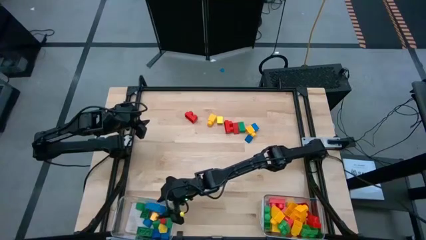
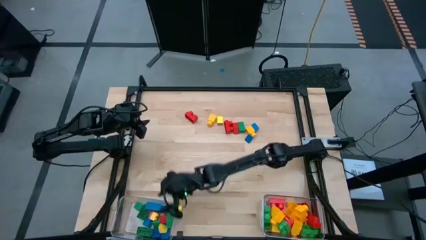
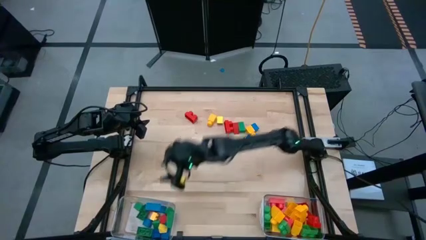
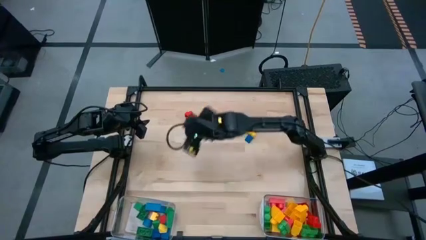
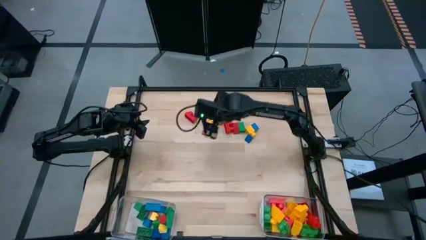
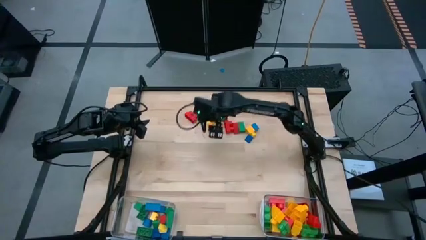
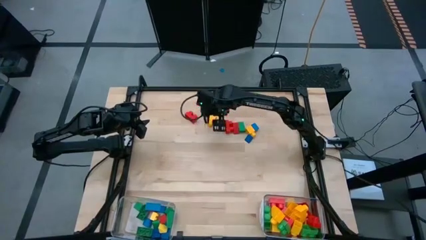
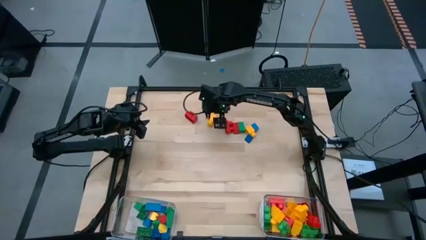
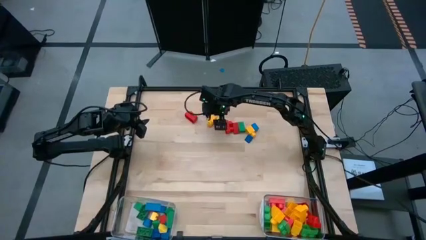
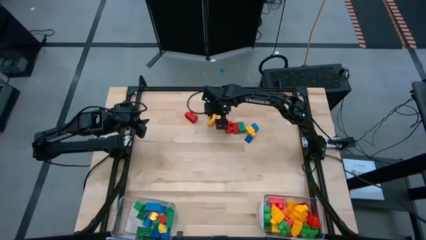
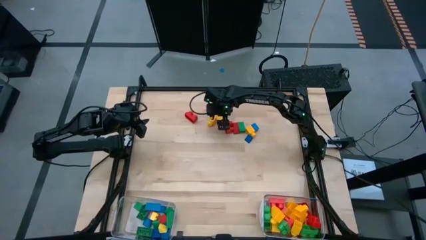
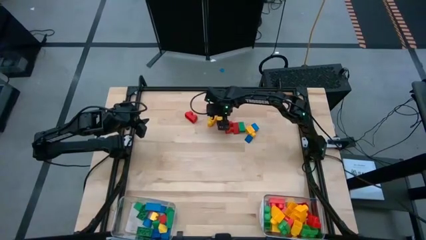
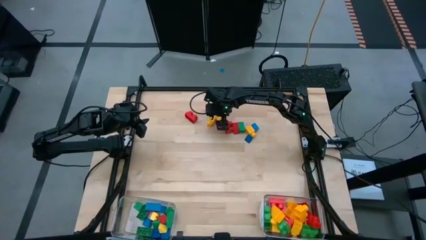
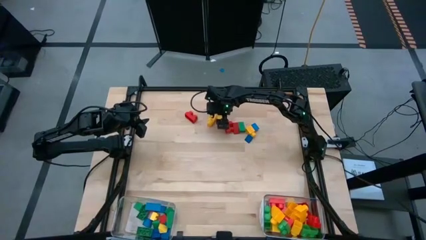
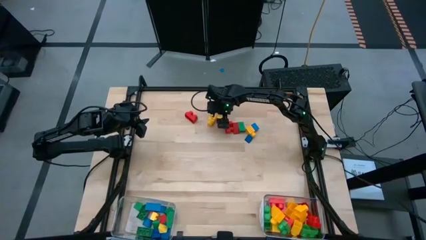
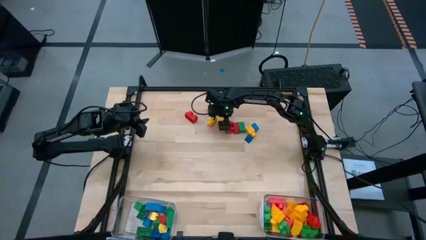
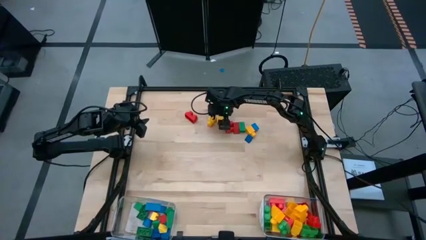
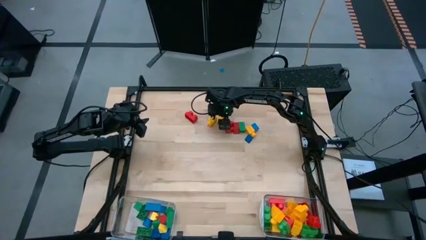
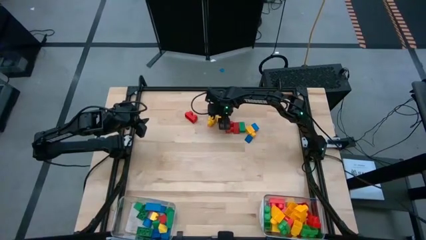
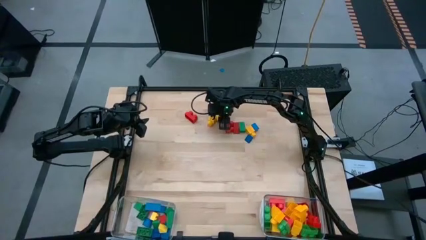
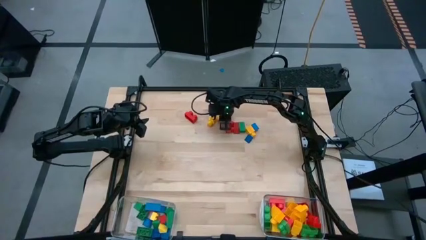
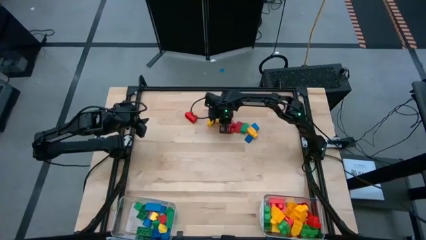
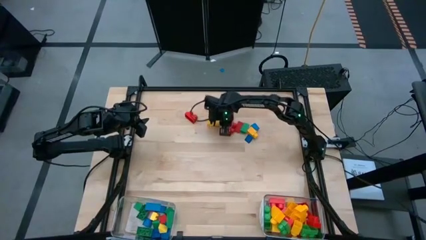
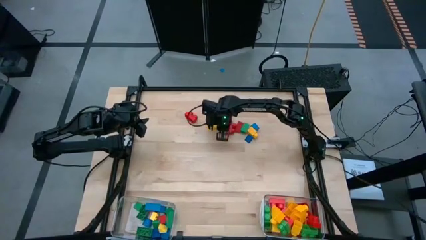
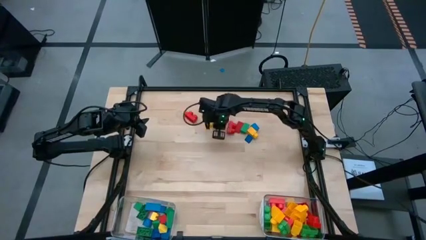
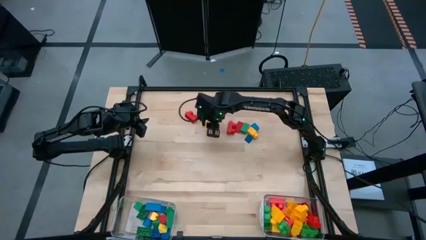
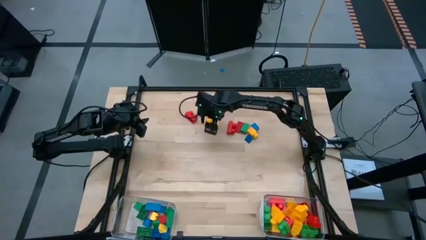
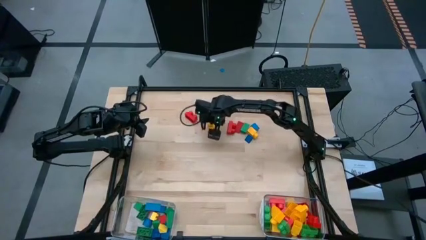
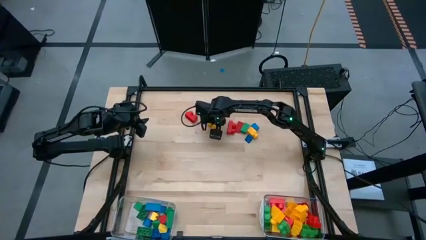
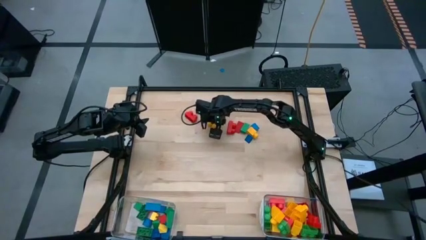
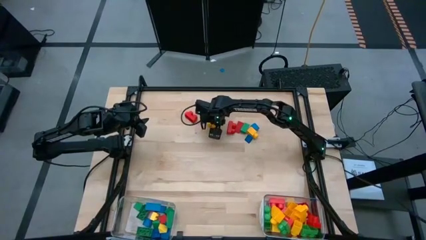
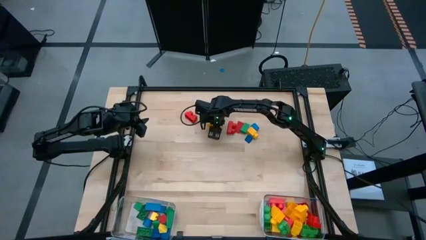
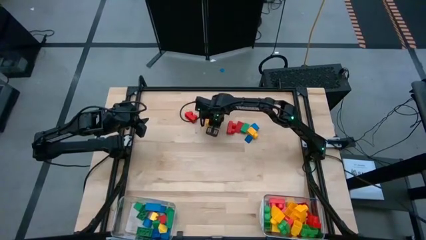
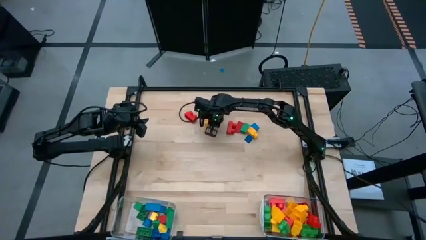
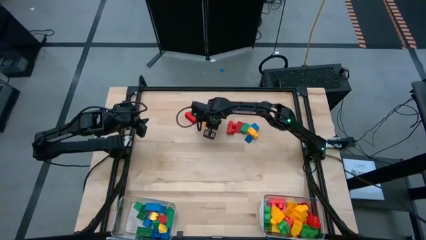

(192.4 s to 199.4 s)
Task: Sort blocks by size
Put the yellow half cylindrical block into the left transparent bin

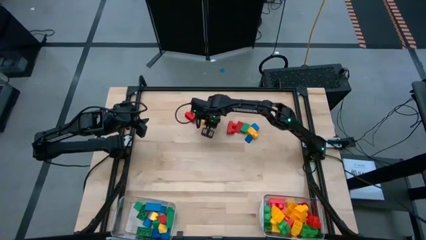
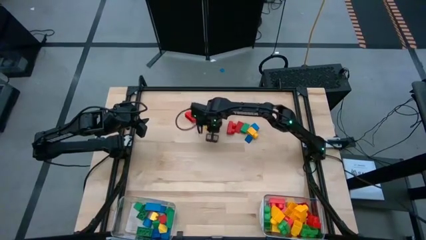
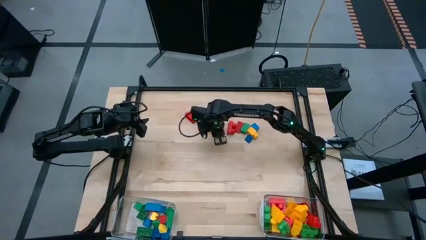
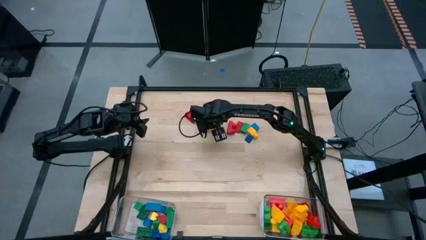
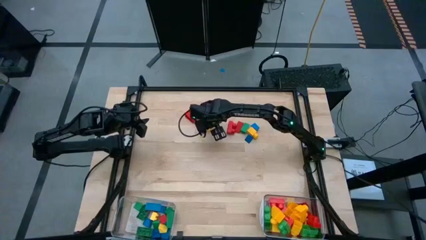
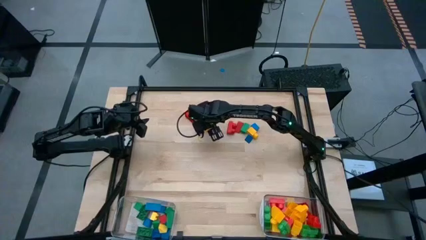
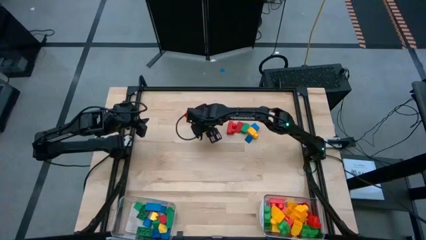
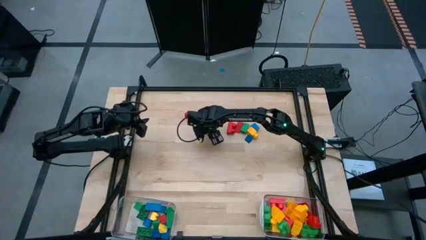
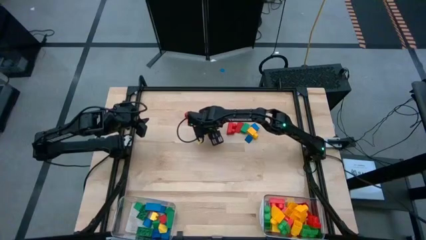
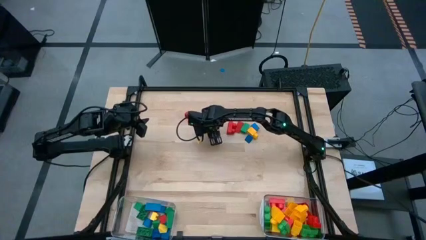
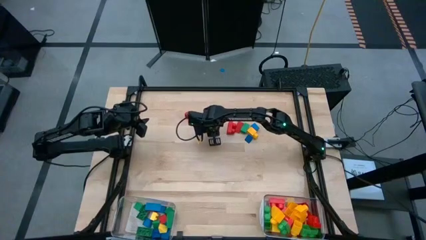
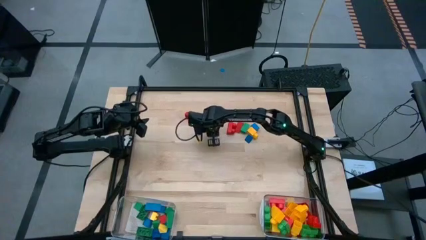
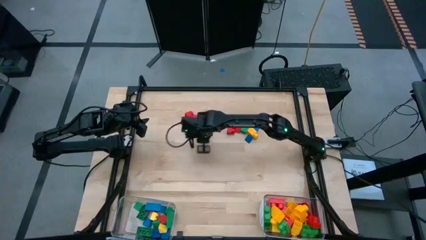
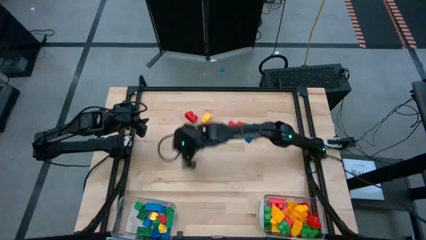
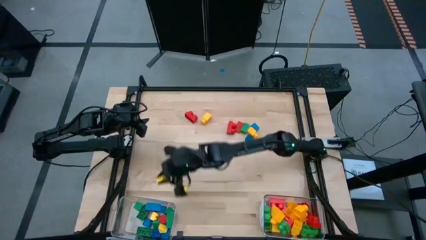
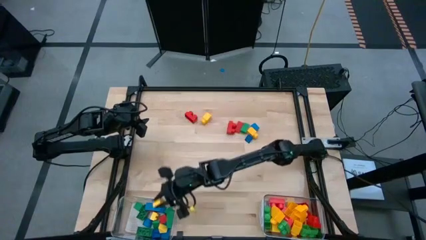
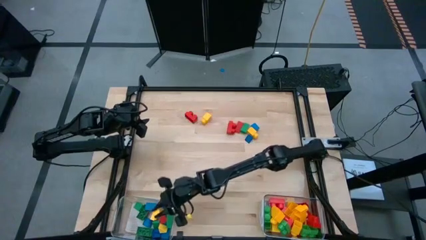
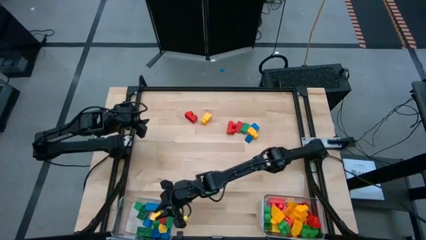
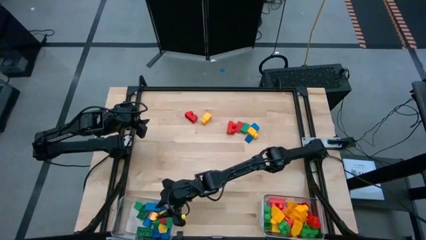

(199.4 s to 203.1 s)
Put the yellow half cylindrical block into the left transparent bin

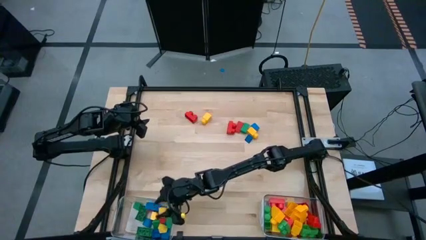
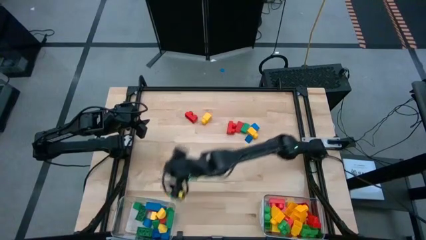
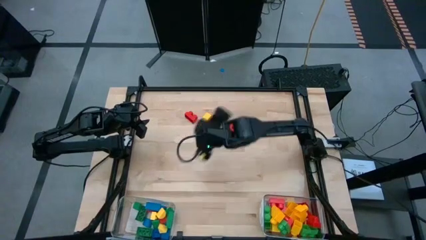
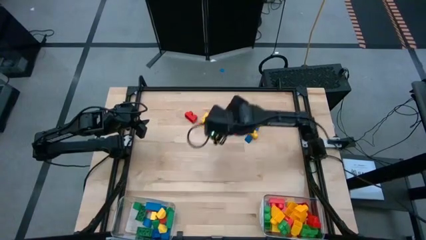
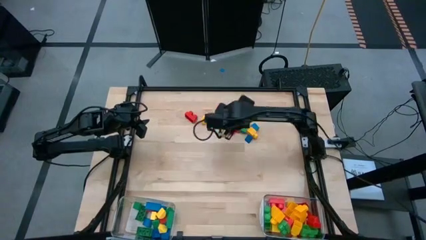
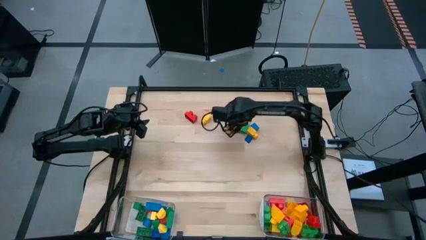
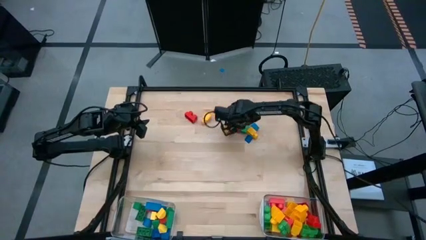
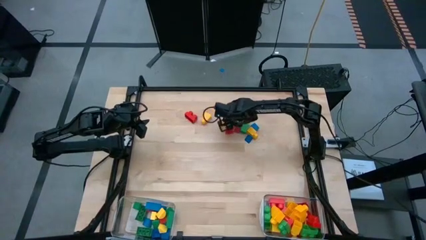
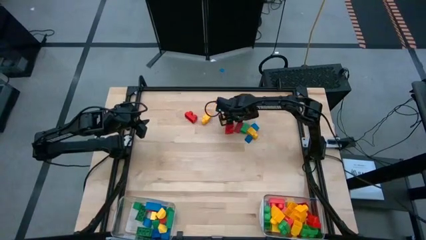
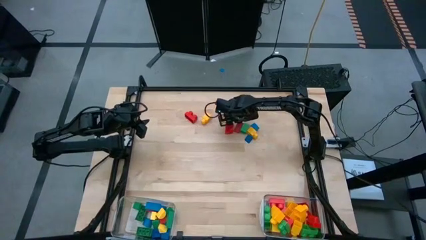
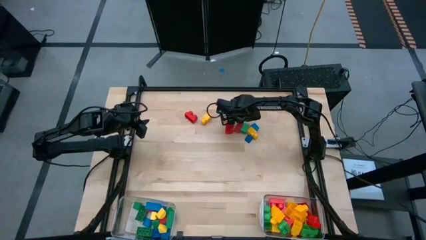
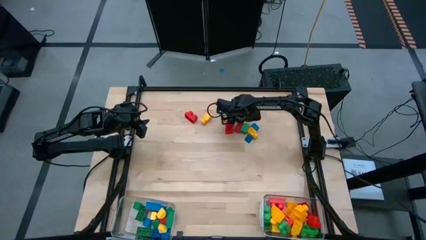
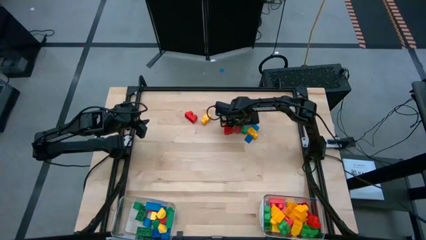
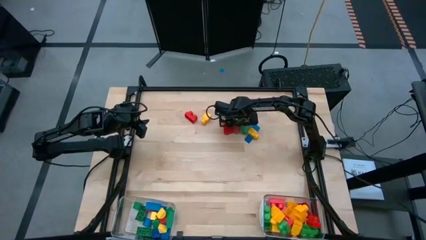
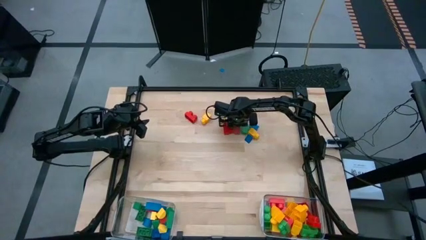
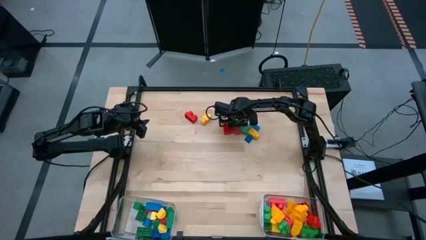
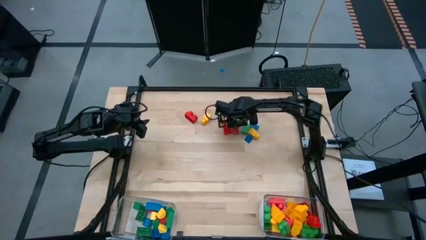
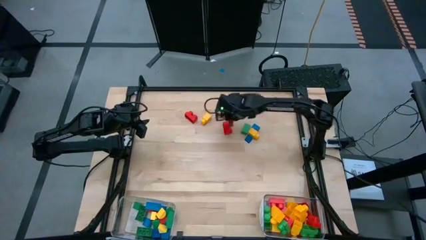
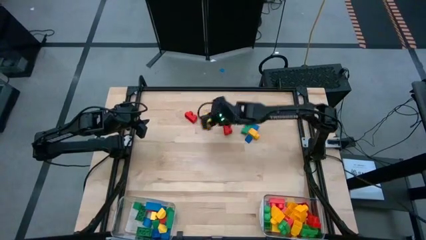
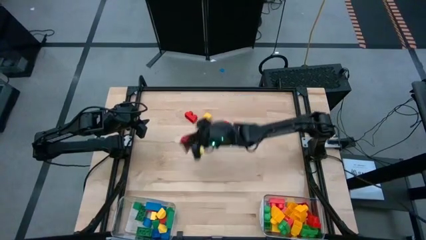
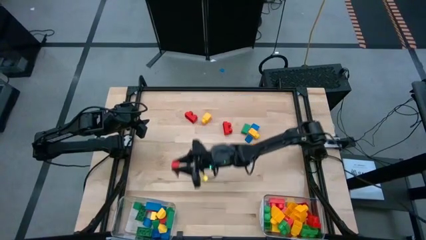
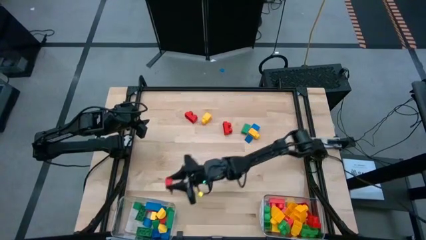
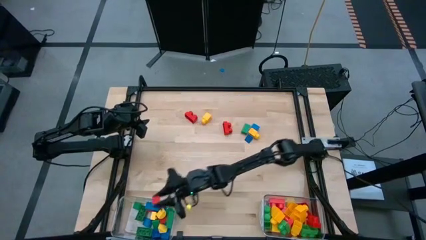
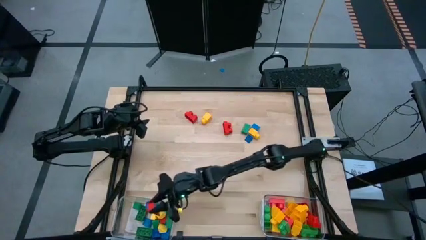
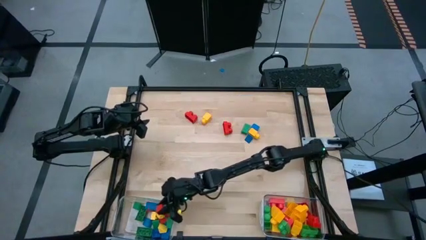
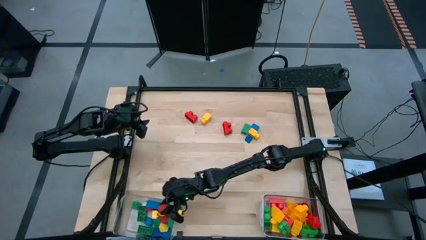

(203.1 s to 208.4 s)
Put the red triangular block into the left transparent bin
